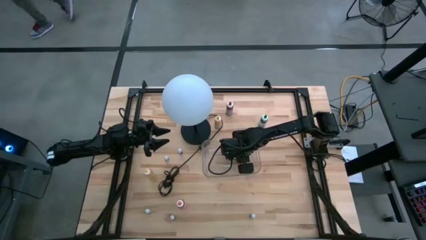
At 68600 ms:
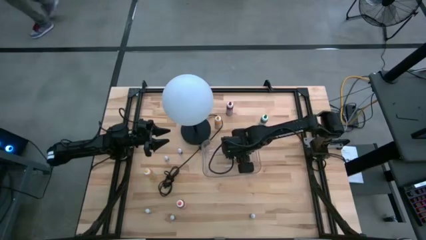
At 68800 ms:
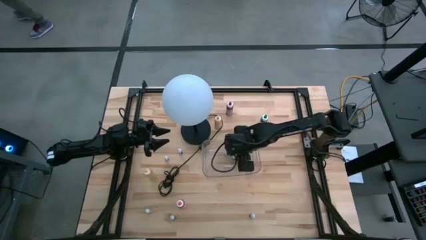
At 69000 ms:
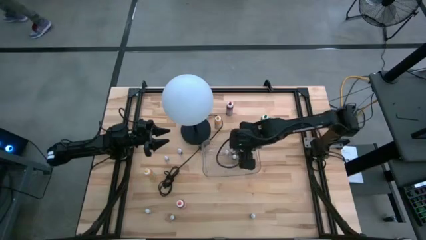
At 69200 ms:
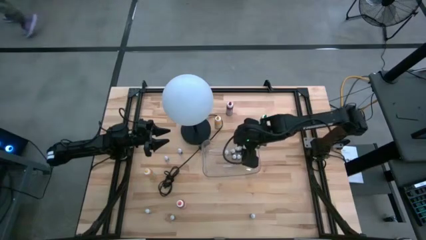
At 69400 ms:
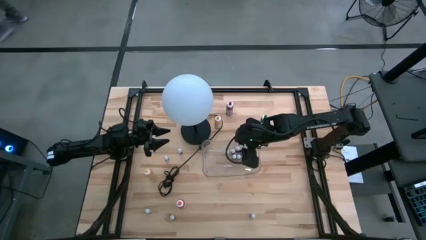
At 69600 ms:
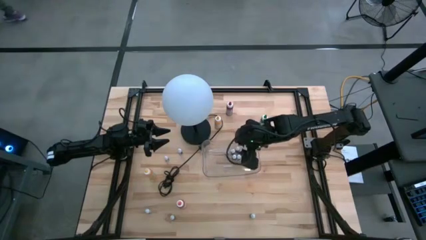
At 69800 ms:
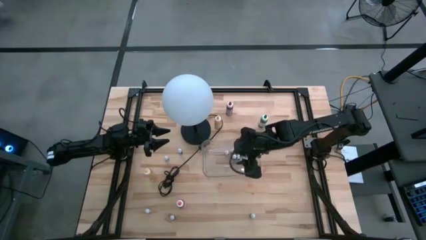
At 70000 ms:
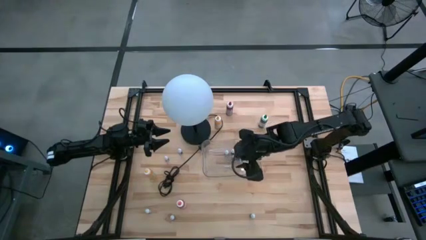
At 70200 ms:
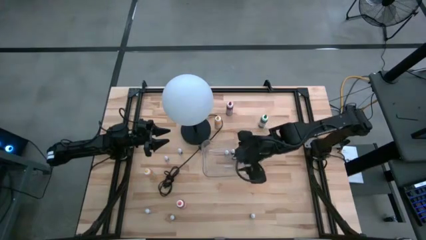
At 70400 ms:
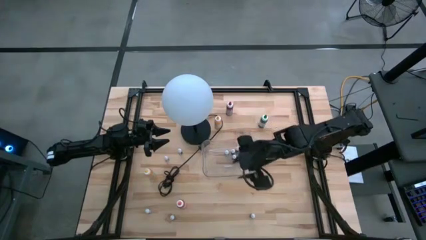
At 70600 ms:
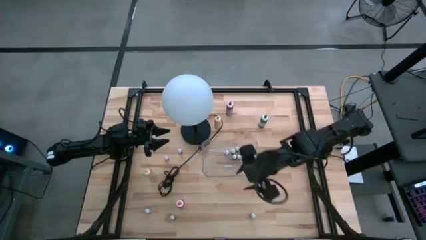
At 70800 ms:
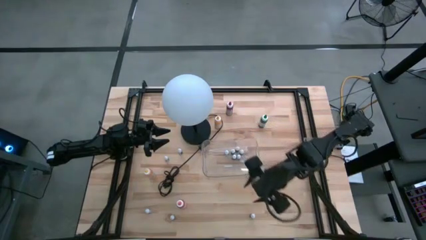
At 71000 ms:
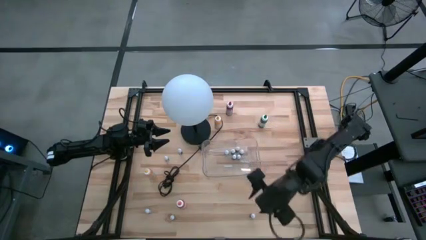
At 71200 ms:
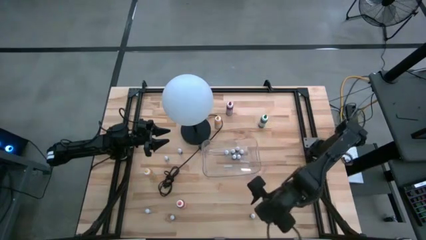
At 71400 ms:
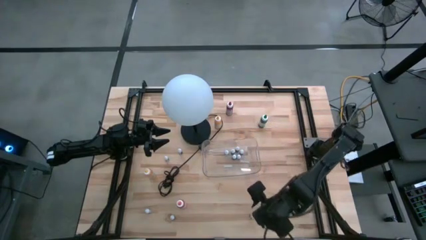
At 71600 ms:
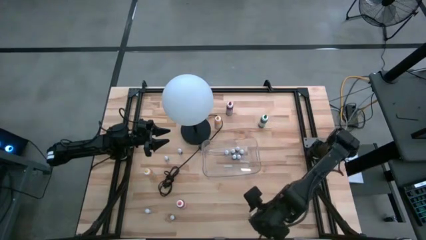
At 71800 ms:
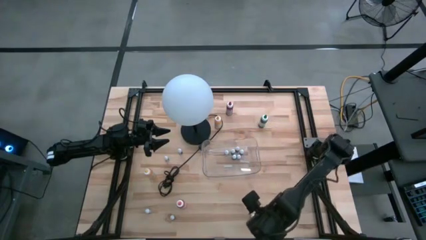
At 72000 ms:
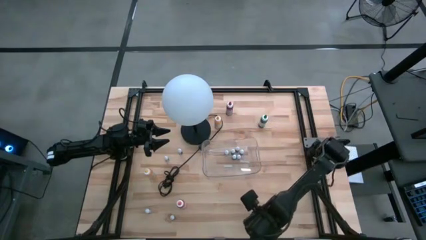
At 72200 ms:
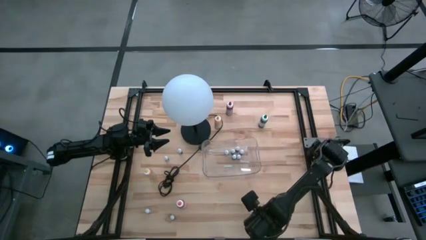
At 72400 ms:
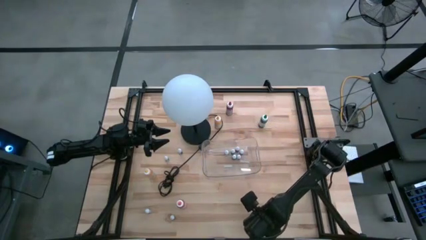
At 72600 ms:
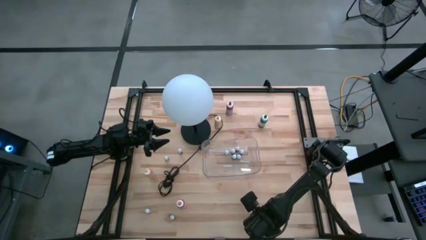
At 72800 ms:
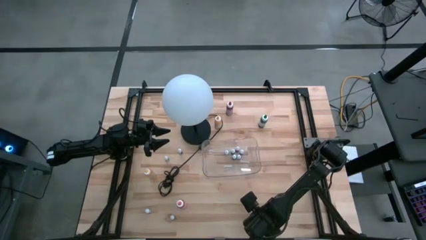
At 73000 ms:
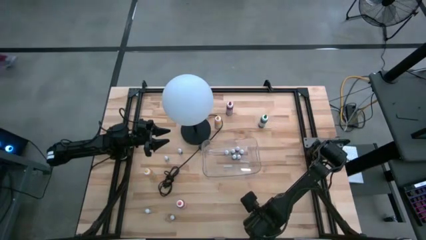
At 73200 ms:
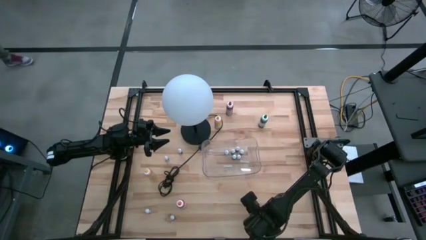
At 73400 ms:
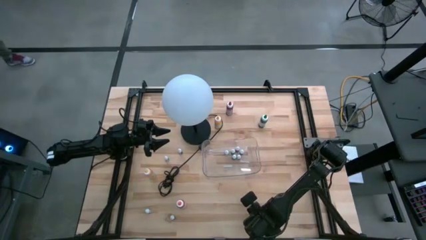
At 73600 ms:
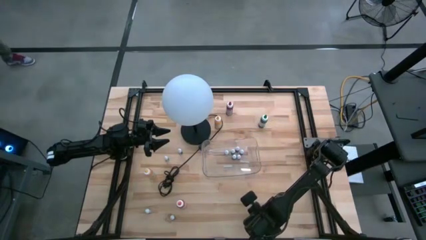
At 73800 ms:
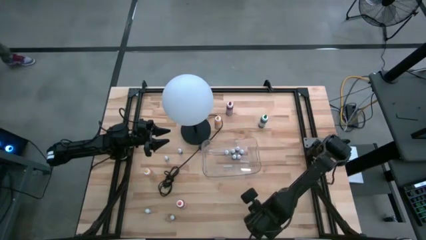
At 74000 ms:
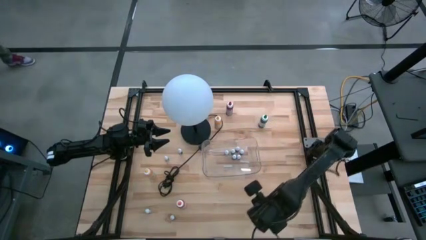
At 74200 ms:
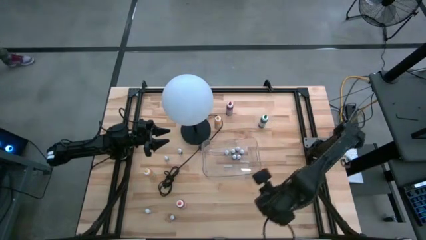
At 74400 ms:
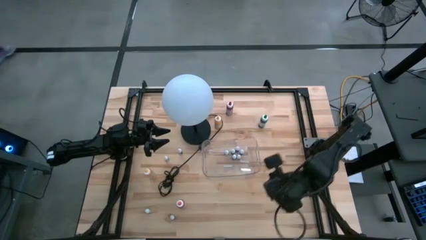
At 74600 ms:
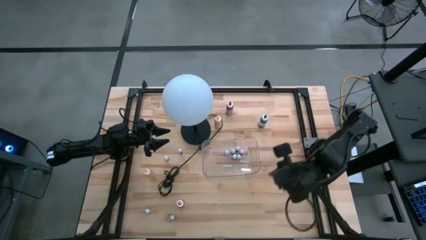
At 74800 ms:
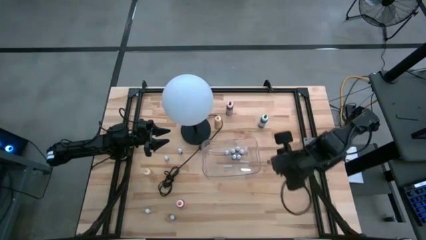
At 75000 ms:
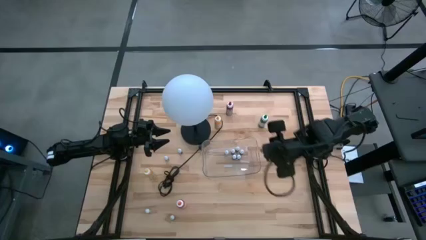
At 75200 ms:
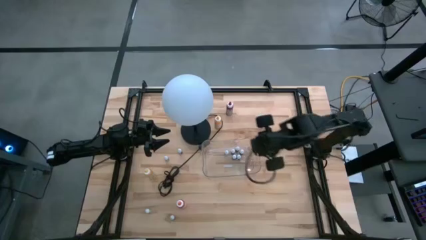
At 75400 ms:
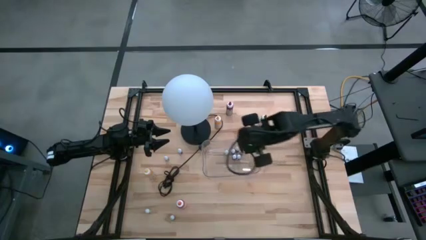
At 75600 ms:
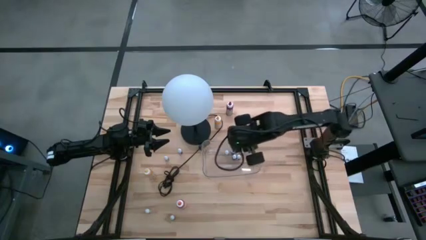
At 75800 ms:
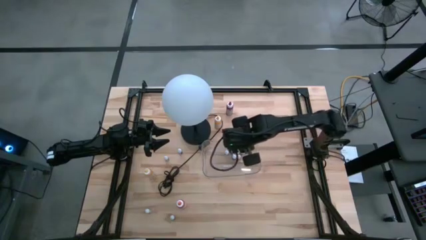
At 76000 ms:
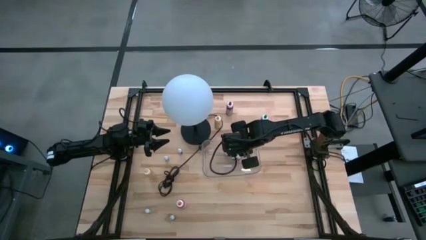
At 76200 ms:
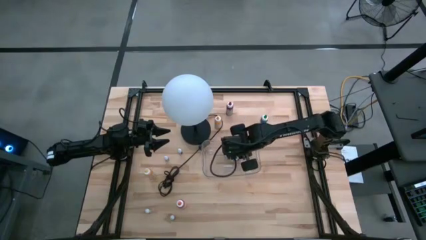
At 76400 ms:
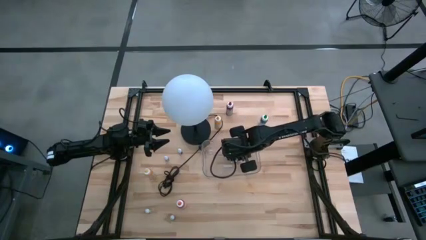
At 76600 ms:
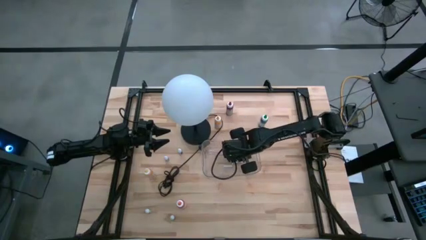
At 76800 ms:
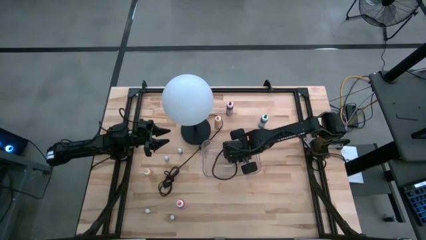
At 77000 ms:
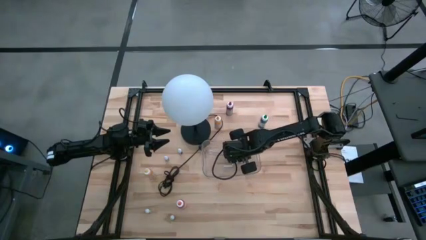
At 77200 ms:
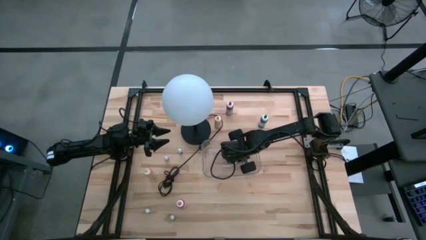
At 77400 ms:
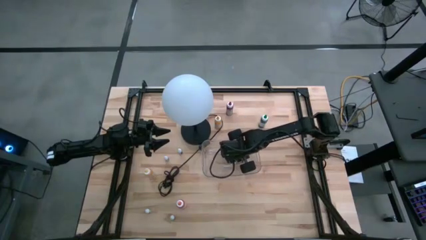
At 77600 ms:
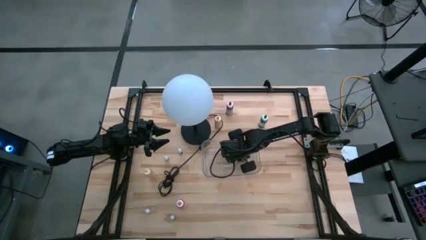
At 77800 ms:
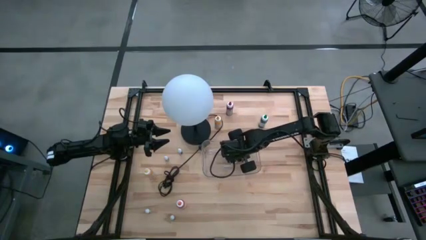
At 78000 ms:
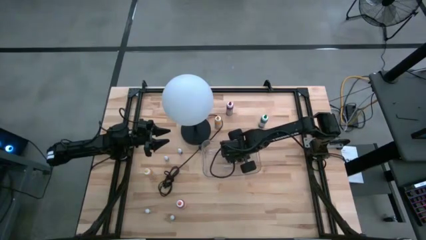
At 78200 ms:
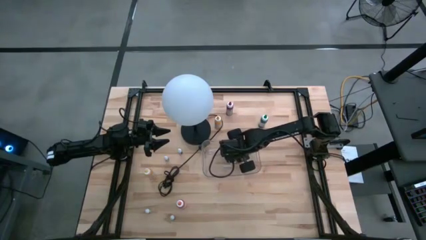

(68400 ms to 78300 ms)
Task: Pick & Place food coloring
Put the small green food coloring bottle into the transparent bin
